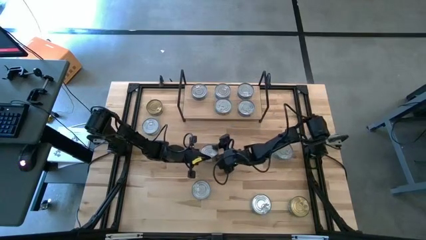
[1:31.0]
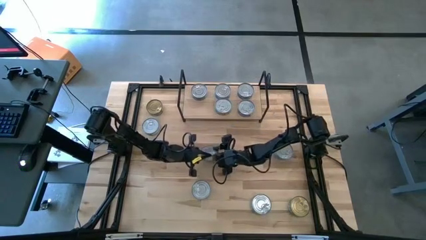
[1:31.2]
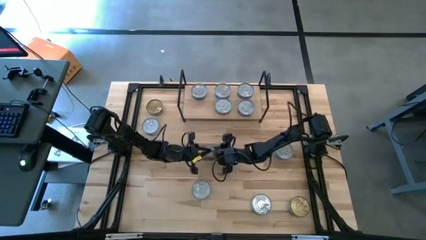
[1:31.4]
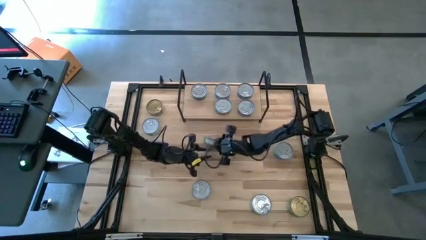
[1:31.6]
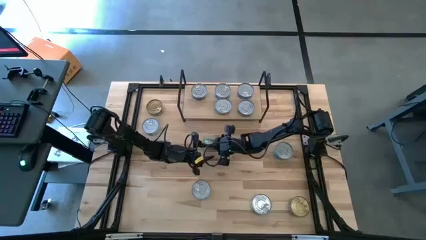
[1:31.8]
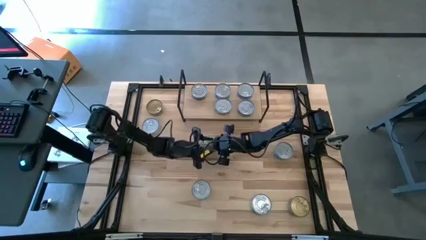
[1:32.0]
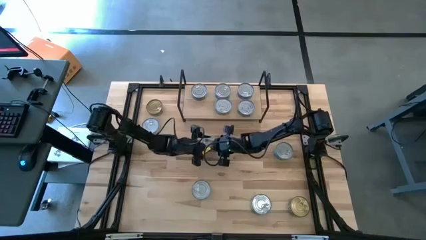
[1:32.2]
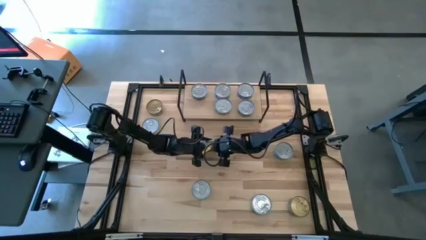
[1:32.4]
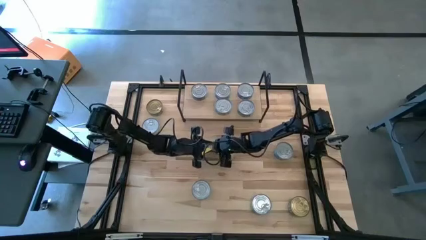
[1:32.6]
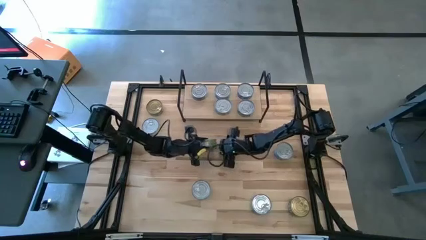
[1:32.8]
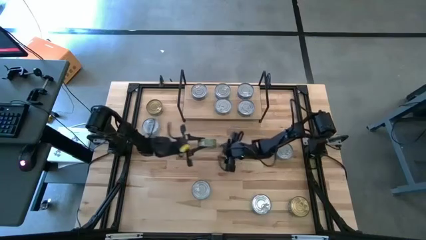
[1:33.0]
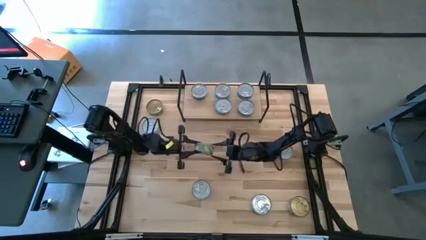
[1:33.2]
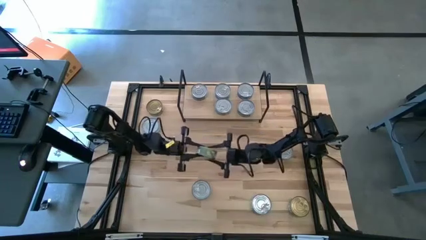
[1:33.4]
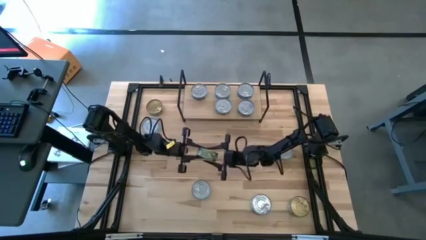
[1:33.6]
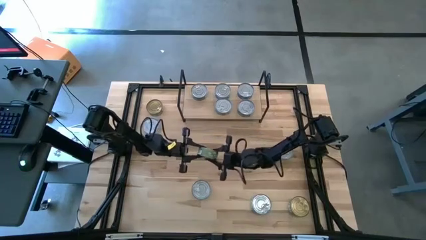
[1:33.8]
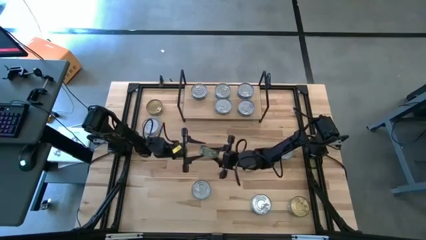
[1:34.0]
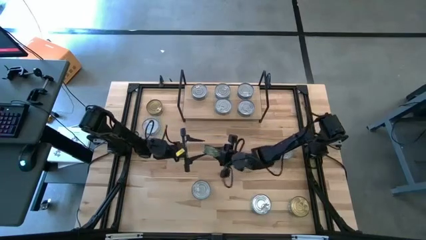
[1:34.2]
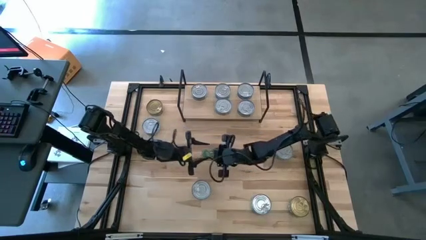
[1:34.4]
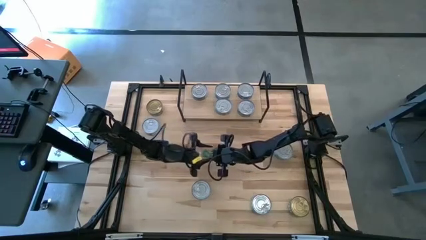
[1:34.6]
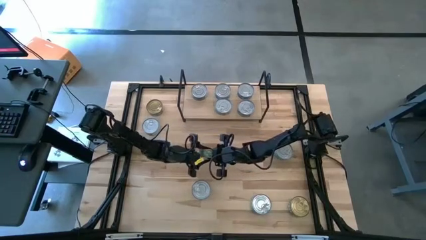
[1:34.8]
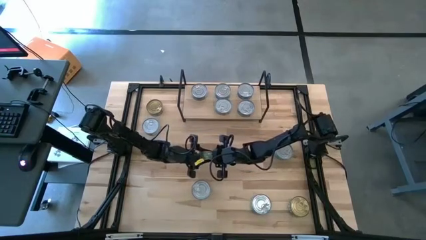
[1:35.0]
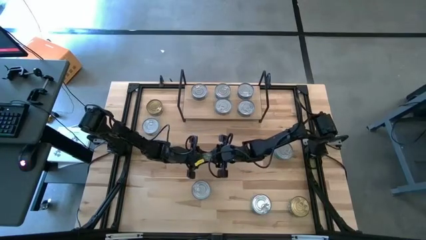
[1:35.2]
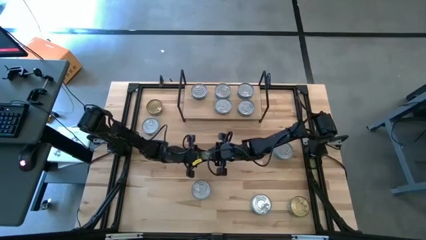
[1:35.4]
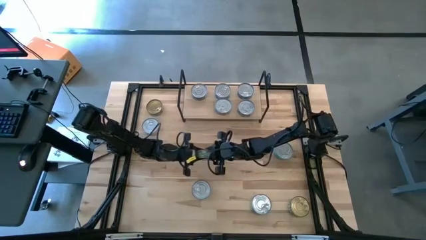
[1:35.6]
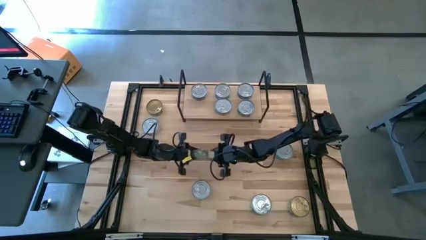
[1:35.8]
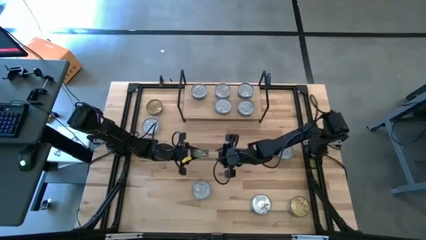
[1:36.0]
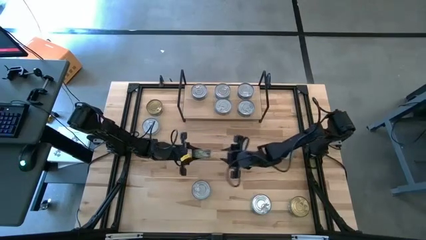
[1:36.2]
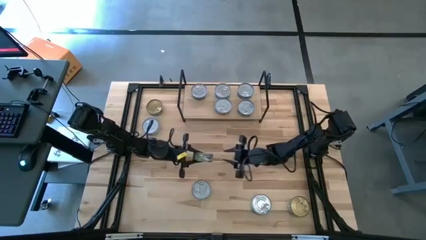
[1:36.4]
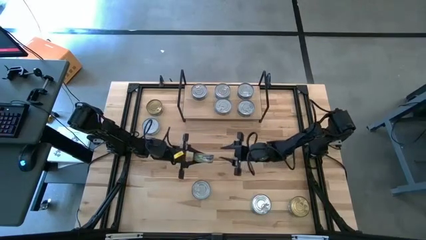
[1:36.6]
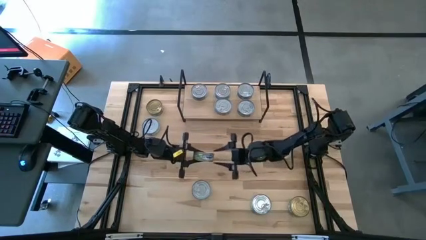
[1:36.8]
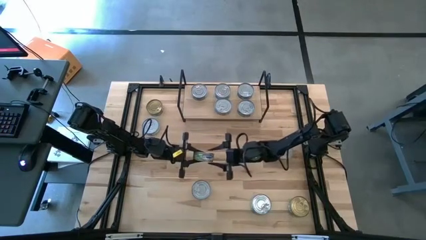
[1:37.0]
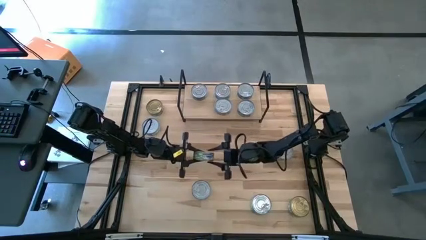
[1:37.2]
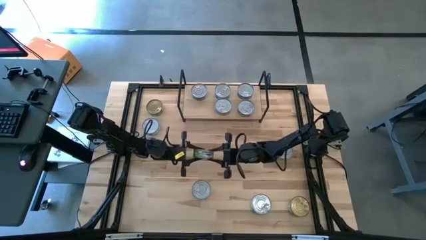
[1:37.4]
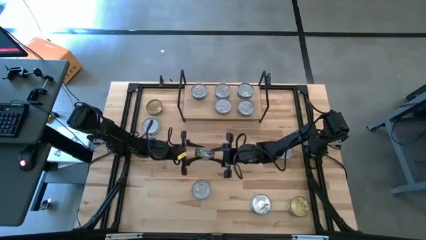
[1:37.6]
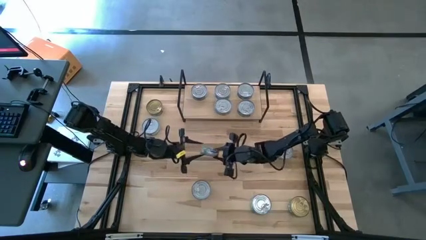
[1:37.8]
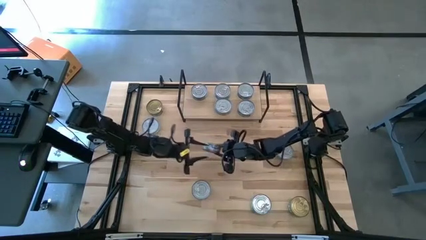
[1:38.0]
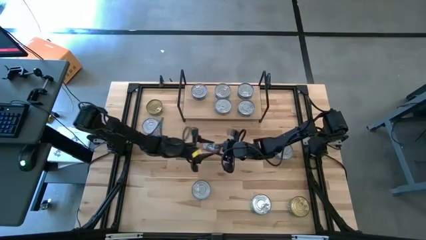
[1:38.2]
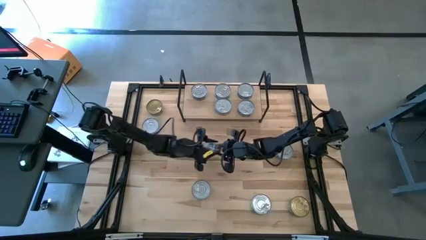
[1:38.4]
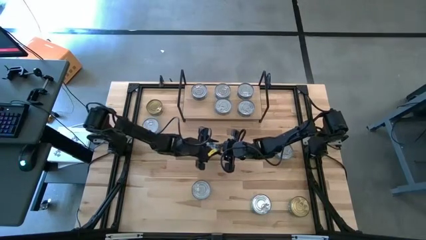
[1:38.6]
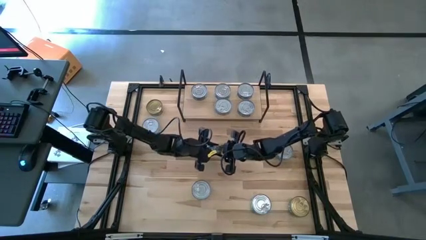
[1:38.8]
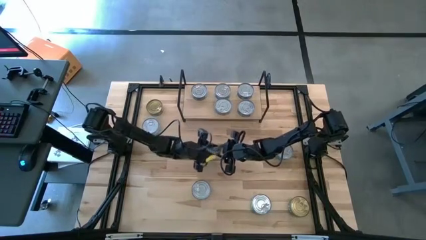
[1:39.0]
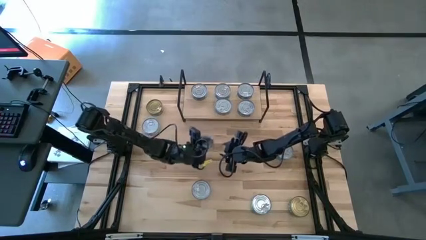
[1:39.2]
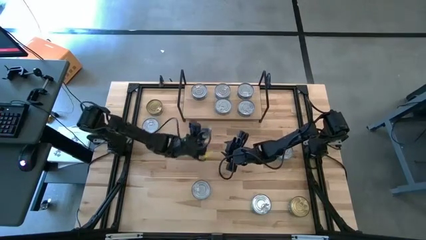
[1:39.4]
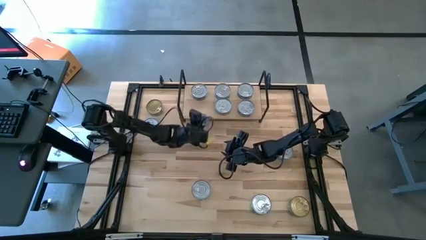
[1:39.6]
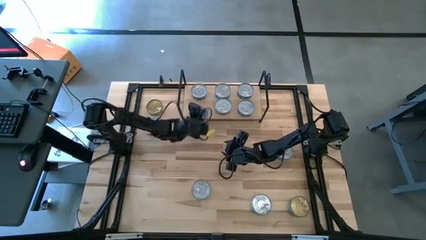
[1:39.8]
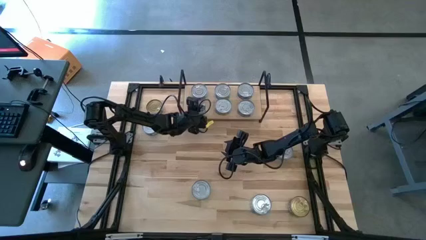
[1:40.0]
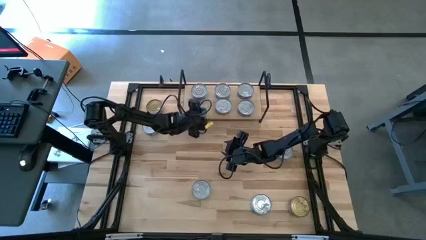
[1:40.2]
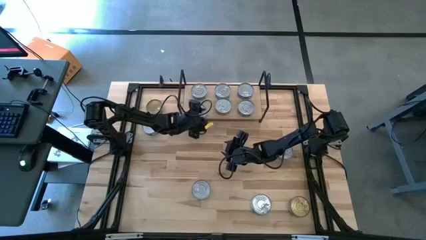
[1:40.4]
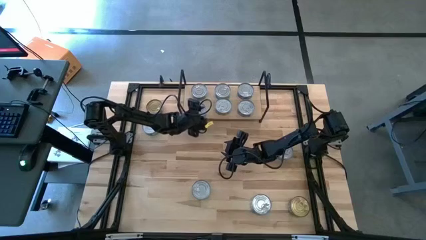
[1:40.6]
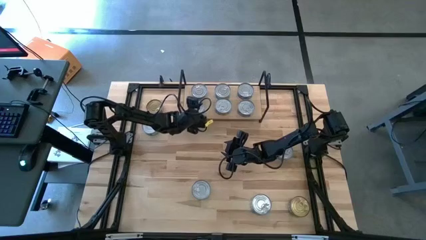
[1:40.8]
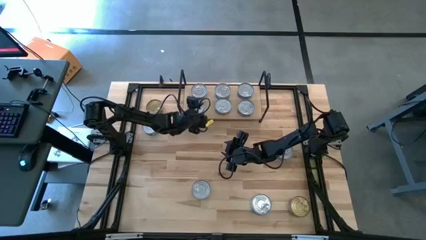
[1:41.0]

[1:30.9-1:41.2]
Task: Stack canned seafood by type on shelf
Put the green tuna can aligned with the other green tuna can on the shelf

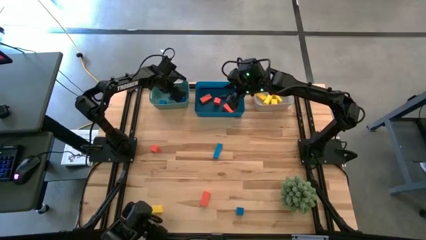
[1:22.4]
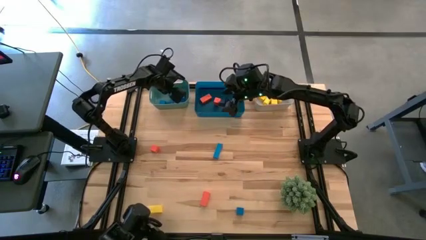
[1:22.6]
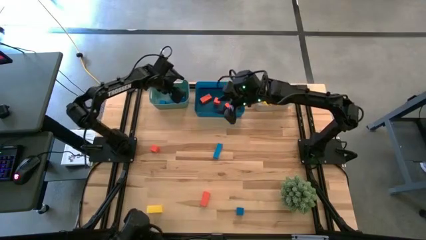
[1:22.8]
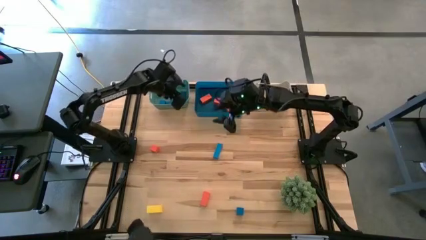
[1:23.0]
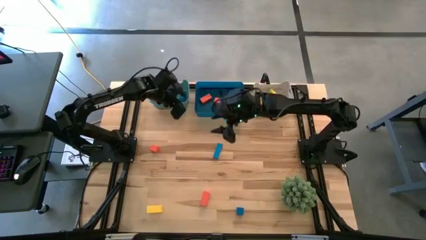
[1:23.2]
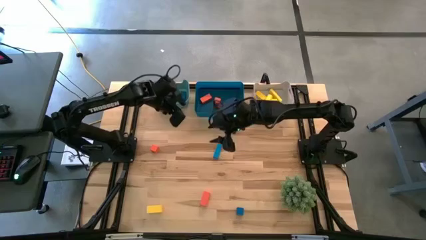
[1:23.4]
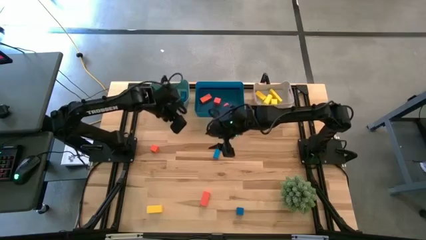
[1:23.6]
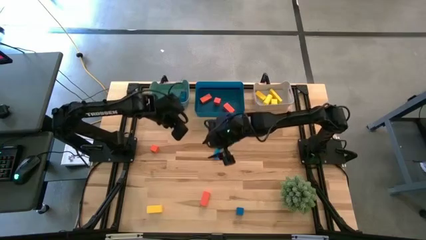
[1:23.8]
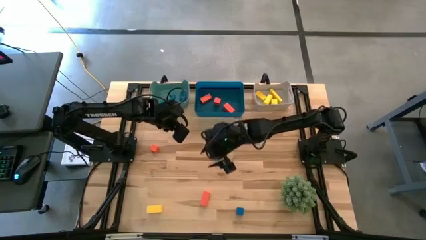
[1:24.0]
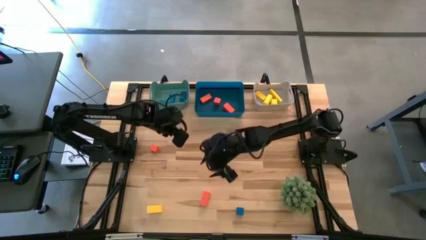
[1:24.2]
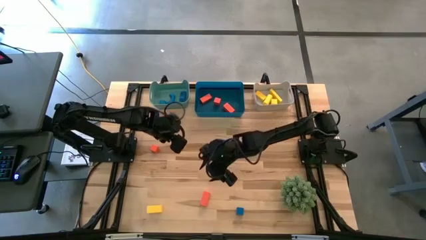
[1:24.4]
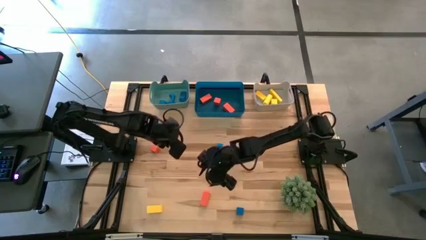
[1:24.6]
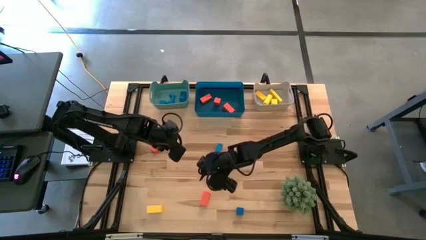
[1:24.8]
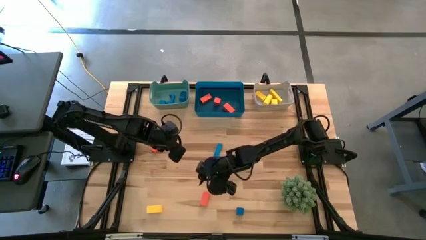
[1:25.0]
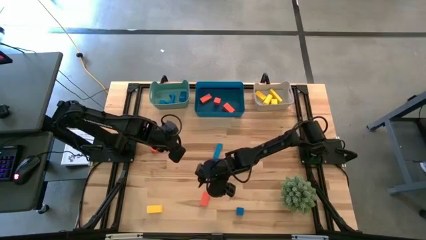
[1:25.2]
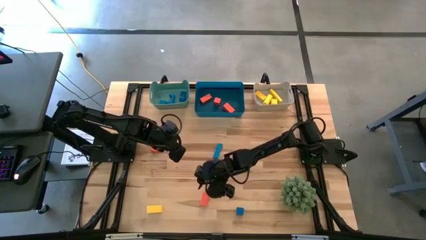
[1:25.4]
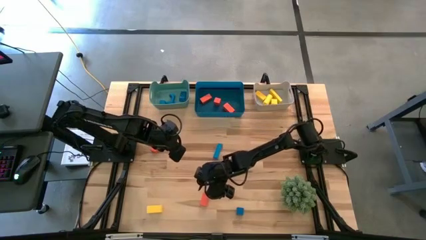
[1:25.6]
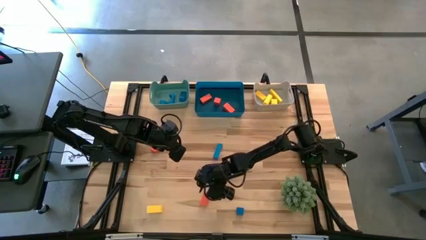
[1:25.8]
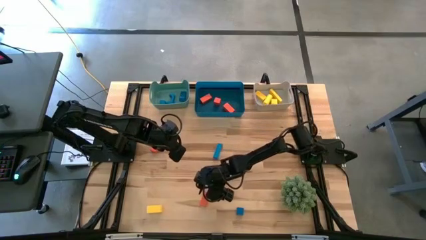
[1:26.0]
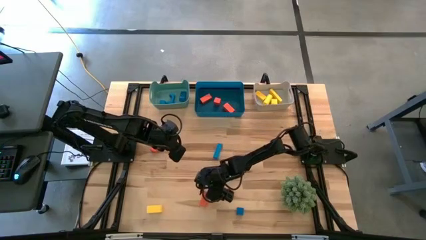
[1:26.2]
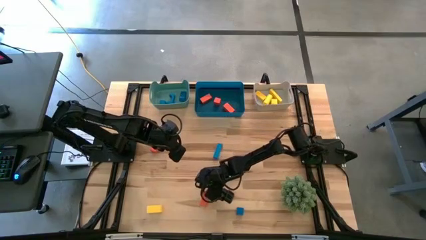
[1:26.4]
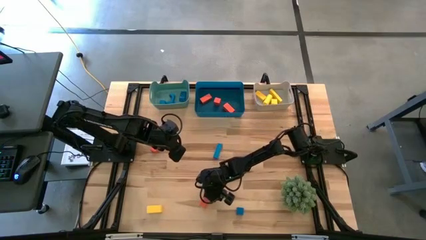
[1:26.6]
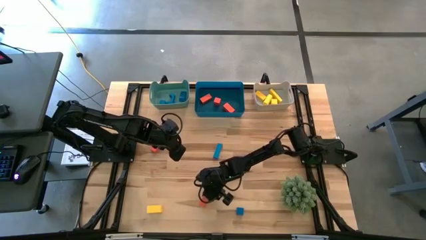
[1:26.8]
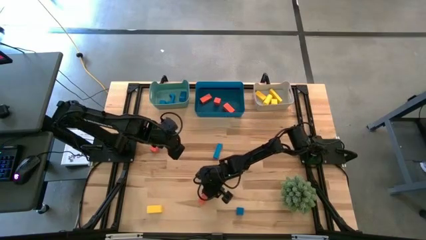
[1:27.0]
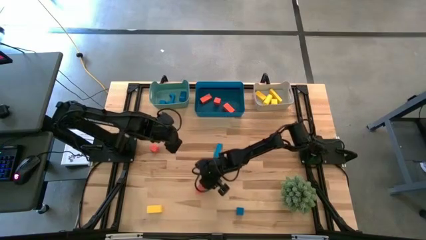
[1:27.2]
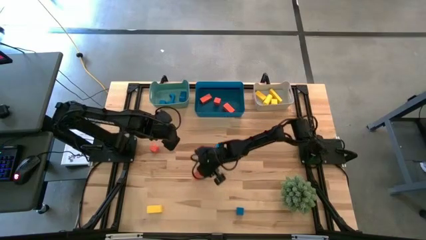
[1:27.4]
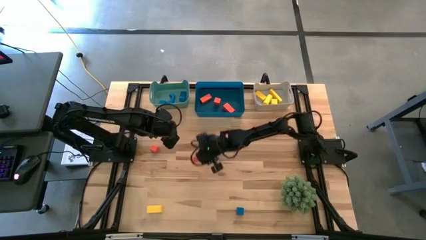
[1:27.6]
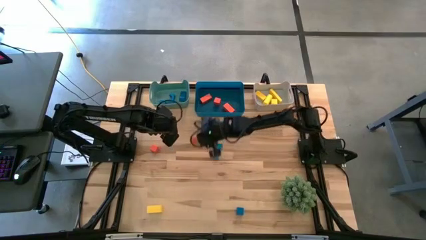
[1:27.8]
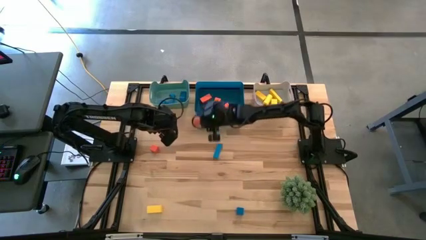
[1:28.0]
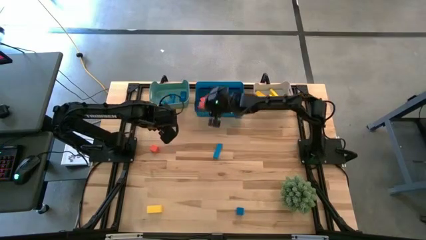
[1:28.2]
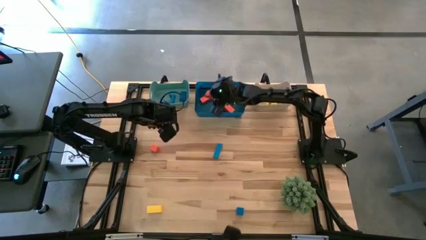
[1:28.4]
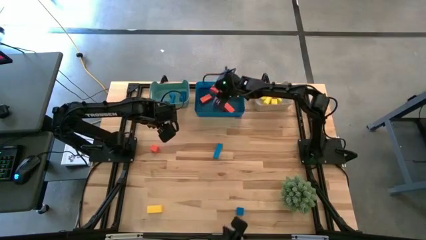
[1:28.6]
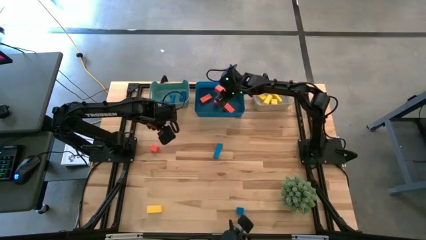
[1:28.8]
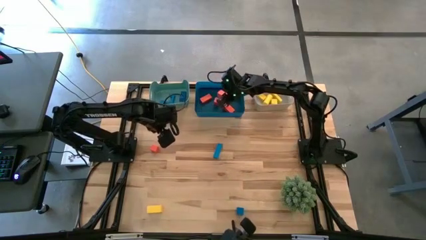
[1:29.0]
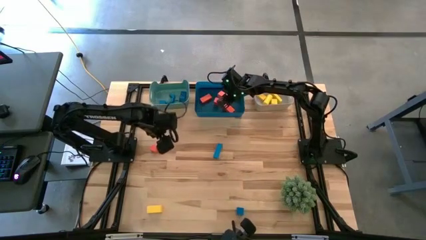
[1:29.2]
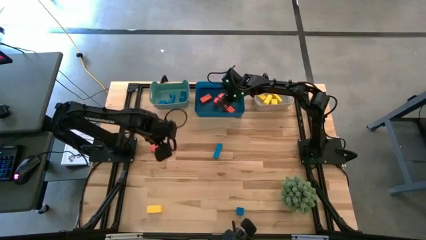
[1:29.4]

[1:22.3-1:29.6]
Task: Sort & place blocks by color
Put the orange block into the blue bin
